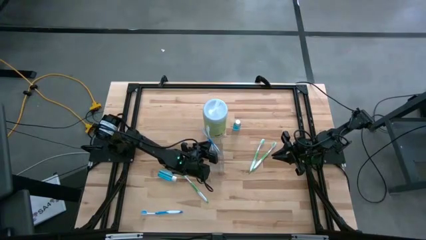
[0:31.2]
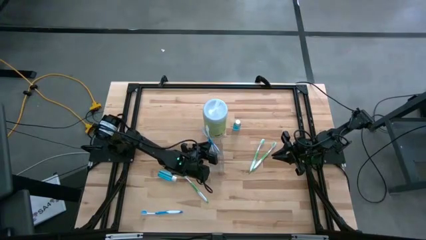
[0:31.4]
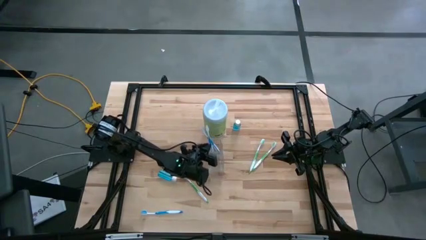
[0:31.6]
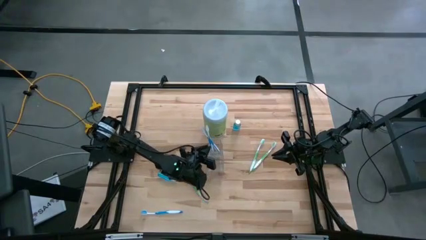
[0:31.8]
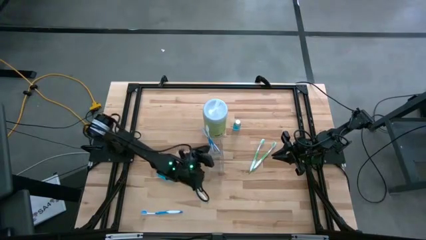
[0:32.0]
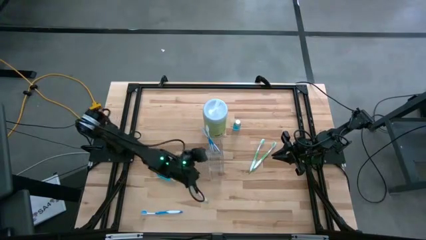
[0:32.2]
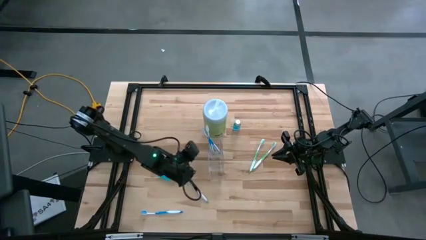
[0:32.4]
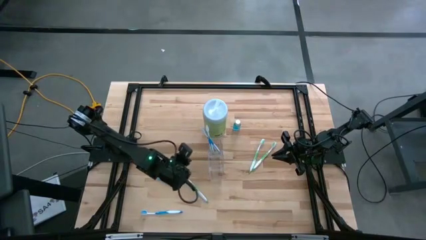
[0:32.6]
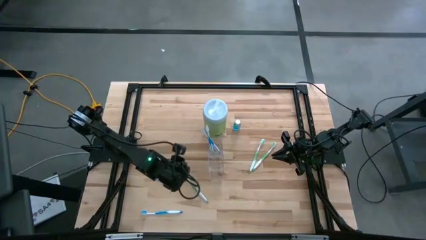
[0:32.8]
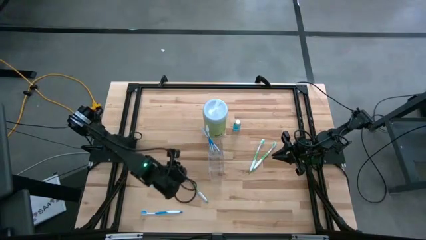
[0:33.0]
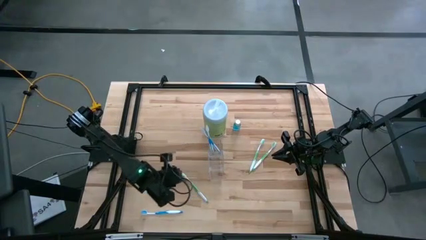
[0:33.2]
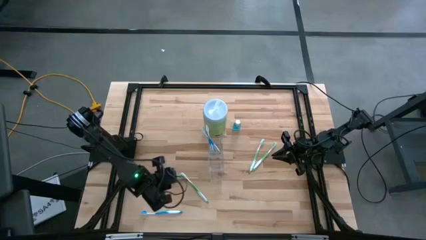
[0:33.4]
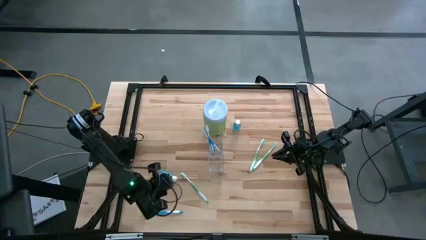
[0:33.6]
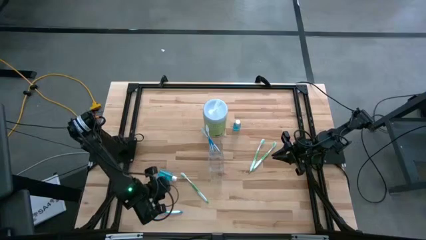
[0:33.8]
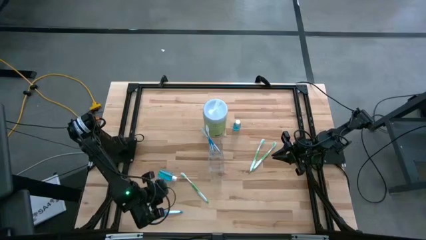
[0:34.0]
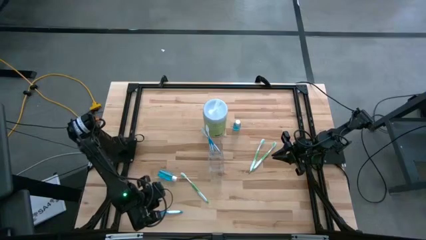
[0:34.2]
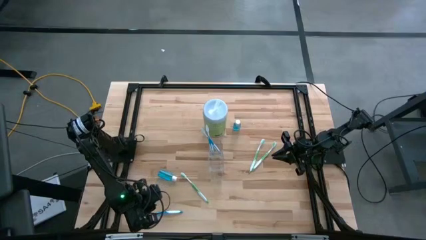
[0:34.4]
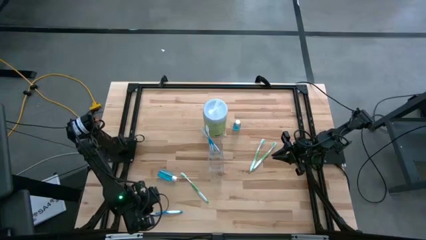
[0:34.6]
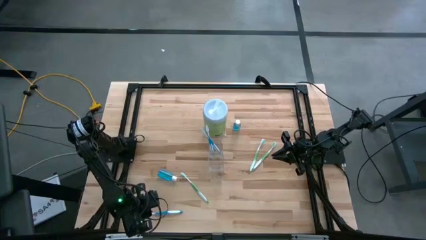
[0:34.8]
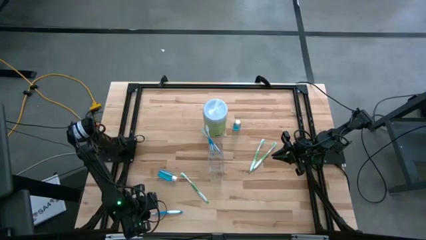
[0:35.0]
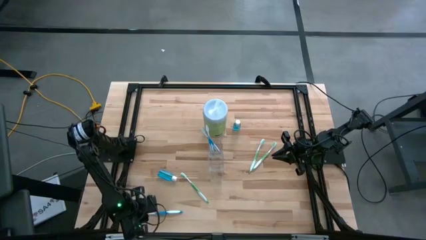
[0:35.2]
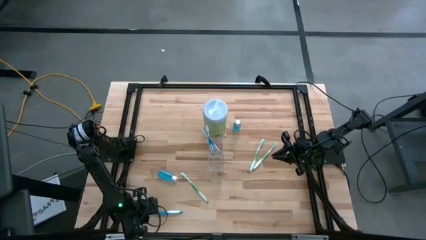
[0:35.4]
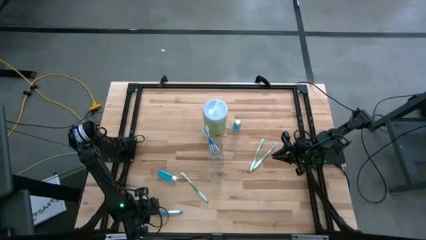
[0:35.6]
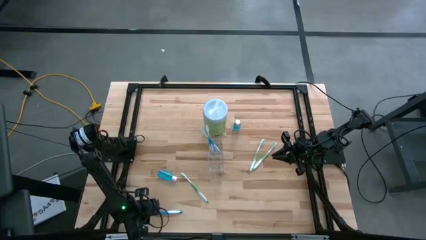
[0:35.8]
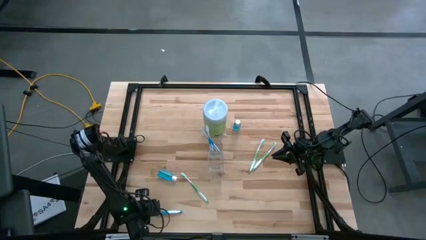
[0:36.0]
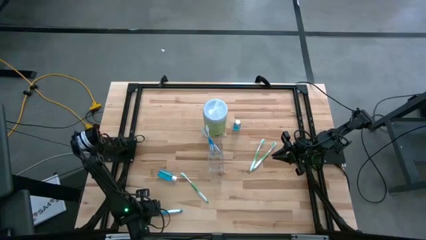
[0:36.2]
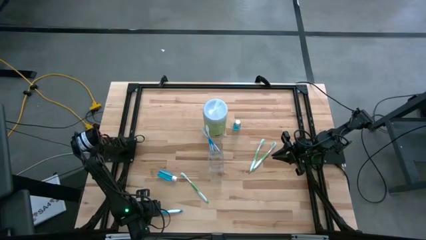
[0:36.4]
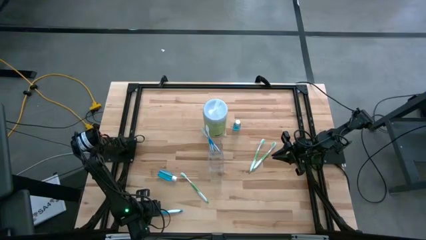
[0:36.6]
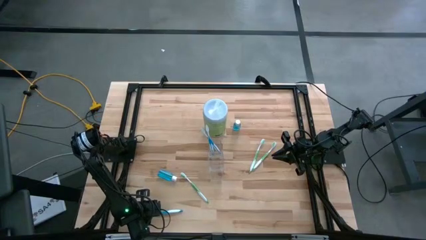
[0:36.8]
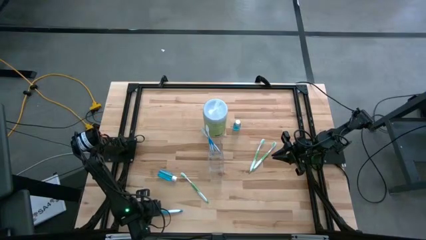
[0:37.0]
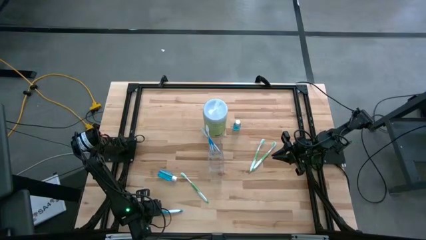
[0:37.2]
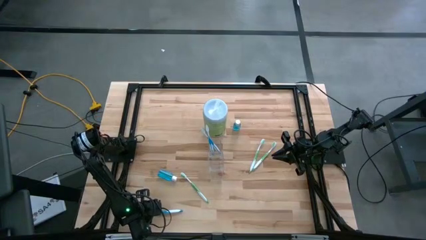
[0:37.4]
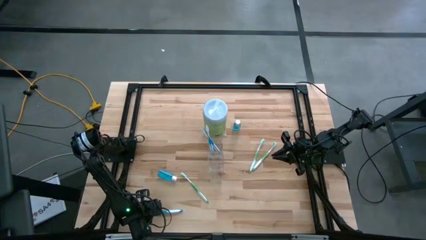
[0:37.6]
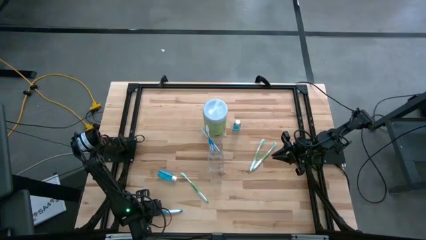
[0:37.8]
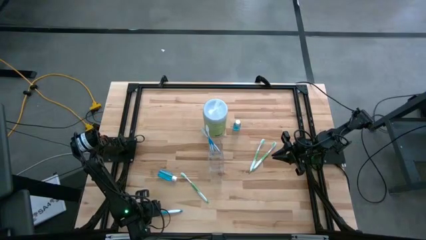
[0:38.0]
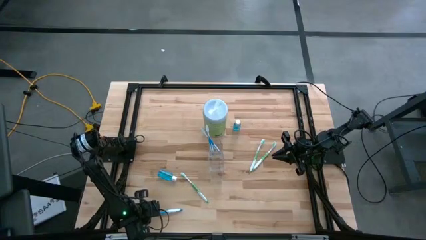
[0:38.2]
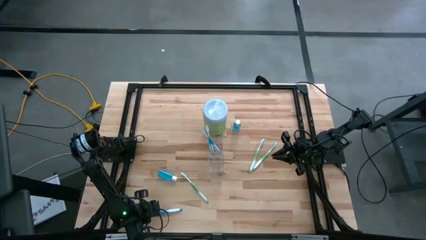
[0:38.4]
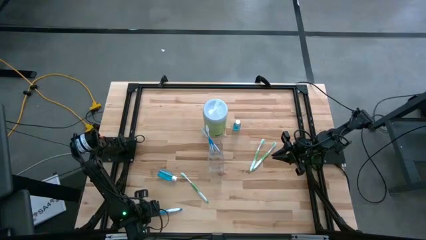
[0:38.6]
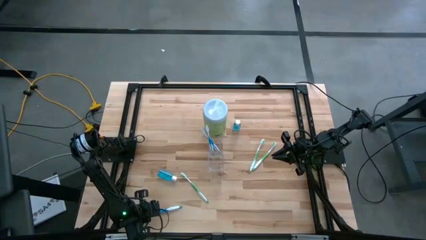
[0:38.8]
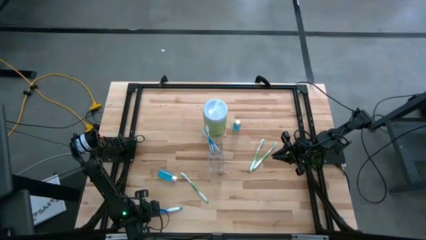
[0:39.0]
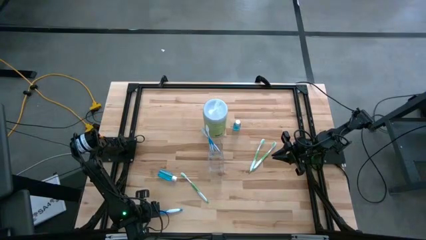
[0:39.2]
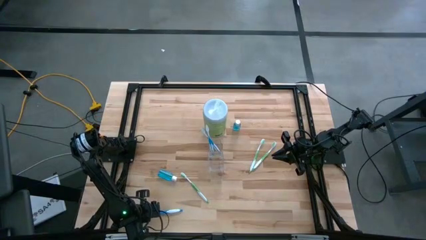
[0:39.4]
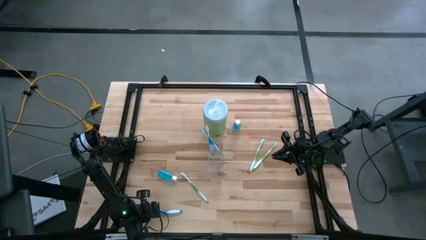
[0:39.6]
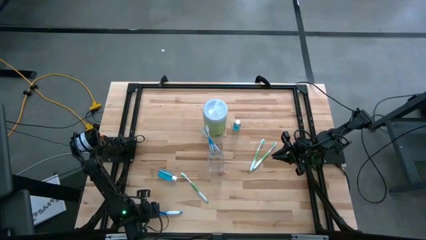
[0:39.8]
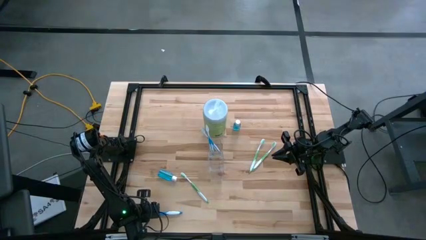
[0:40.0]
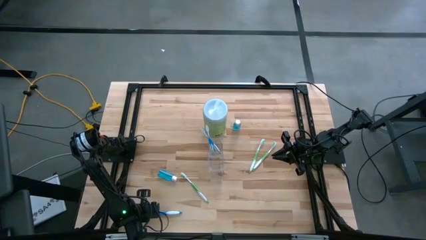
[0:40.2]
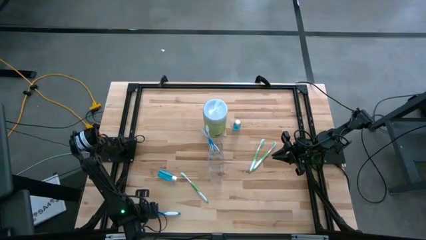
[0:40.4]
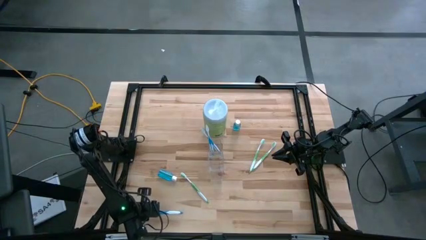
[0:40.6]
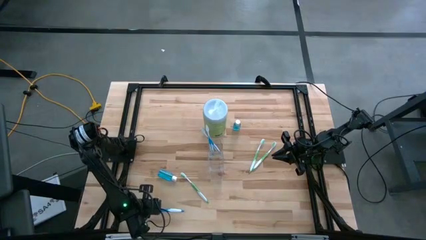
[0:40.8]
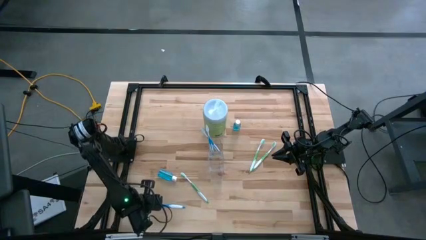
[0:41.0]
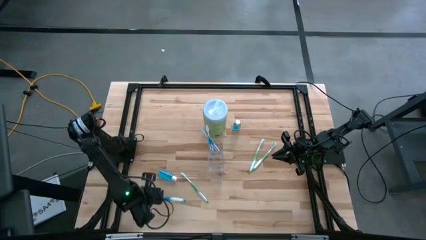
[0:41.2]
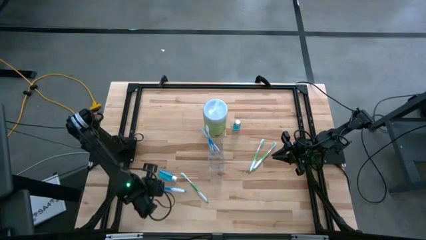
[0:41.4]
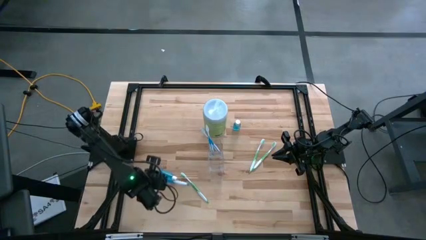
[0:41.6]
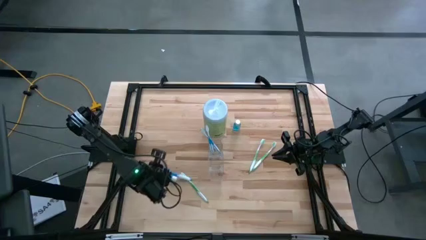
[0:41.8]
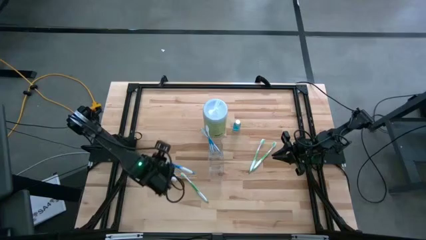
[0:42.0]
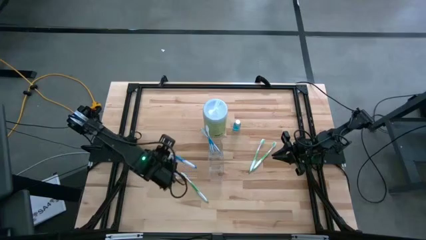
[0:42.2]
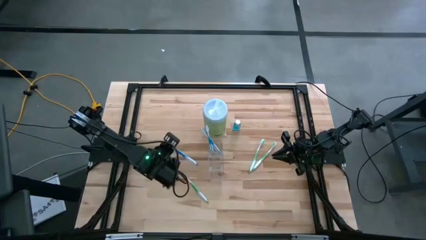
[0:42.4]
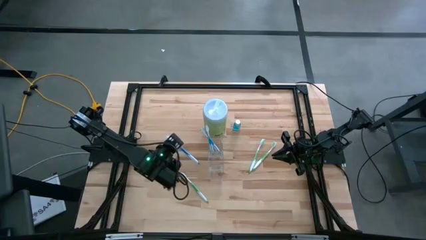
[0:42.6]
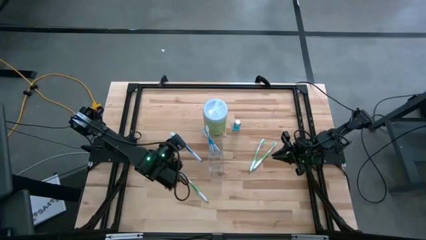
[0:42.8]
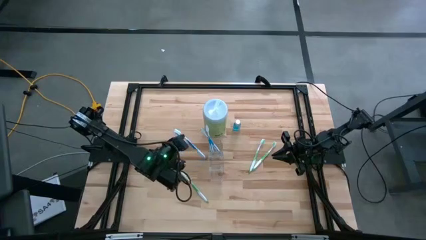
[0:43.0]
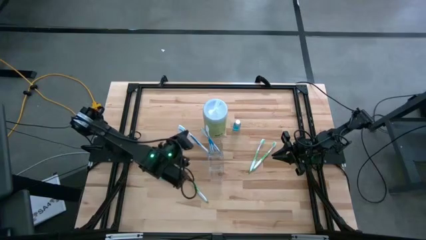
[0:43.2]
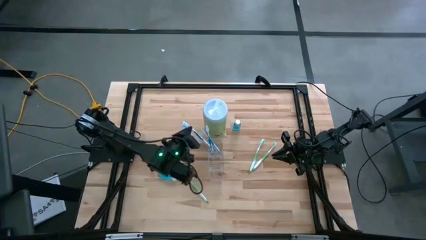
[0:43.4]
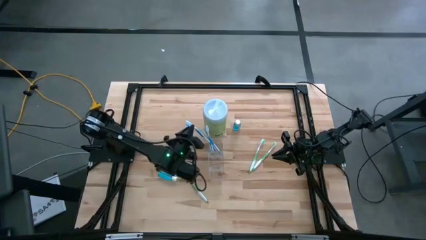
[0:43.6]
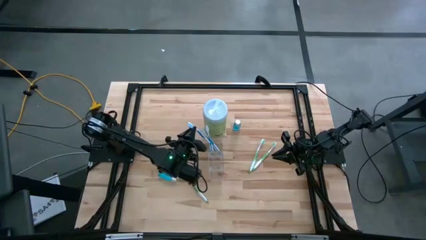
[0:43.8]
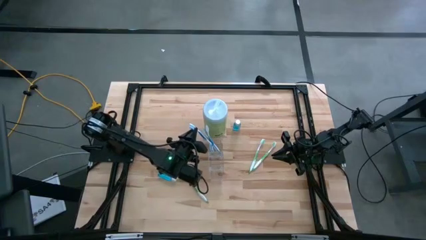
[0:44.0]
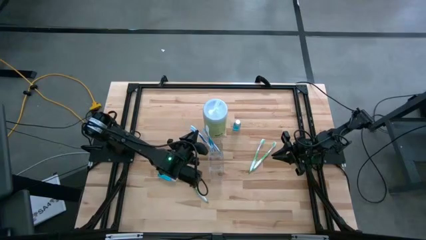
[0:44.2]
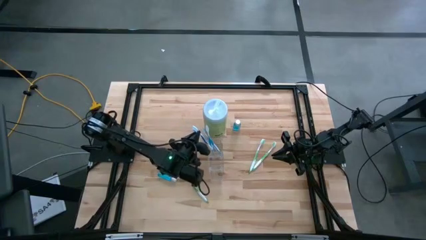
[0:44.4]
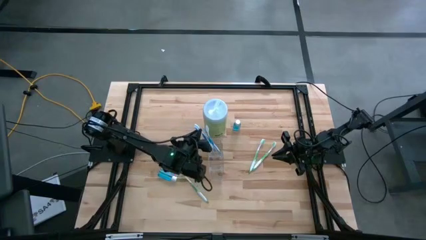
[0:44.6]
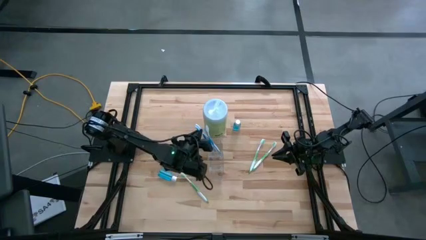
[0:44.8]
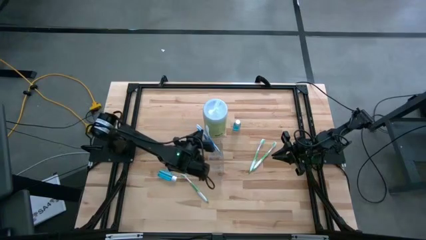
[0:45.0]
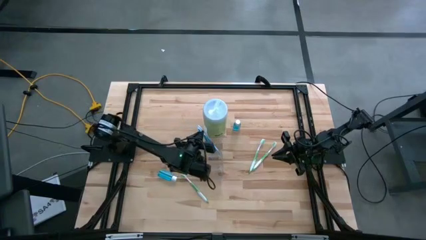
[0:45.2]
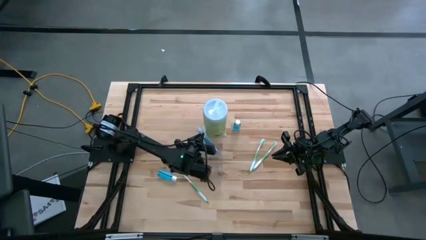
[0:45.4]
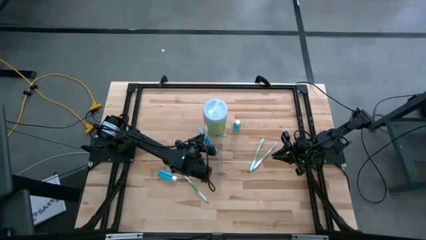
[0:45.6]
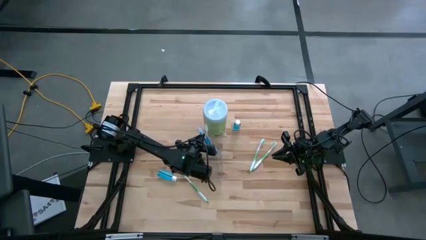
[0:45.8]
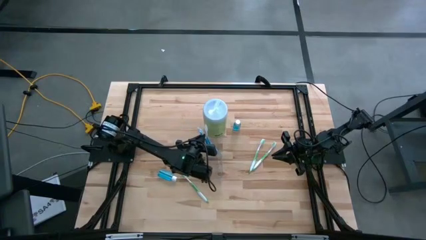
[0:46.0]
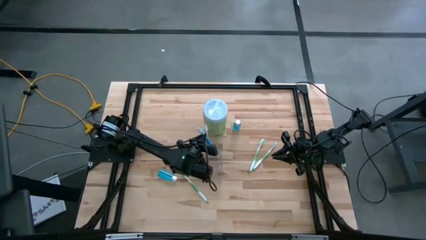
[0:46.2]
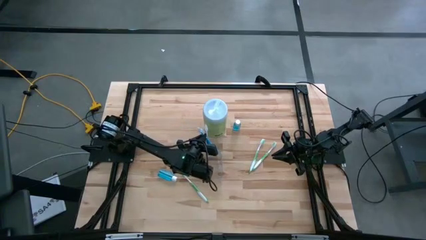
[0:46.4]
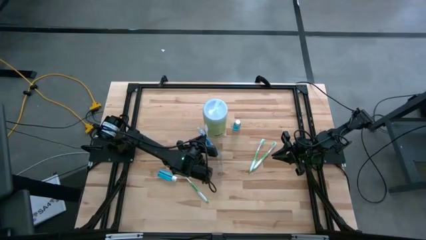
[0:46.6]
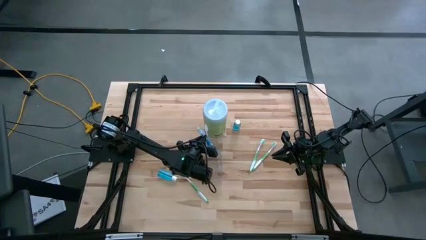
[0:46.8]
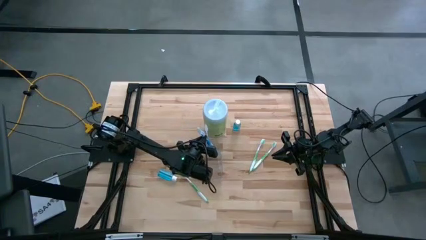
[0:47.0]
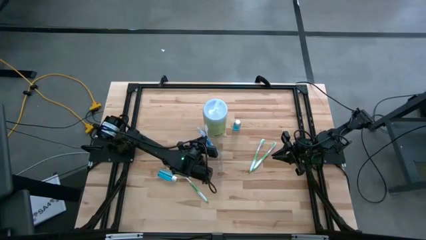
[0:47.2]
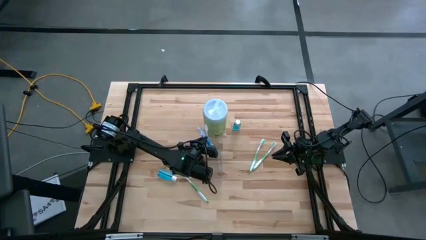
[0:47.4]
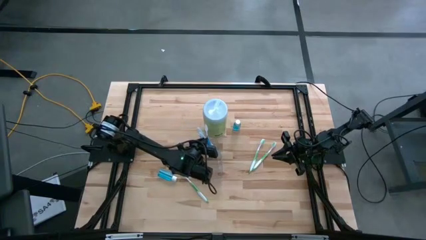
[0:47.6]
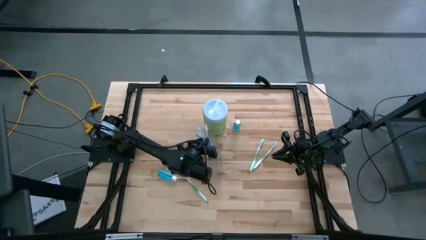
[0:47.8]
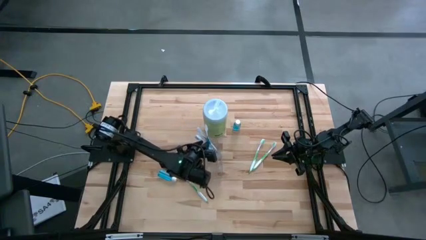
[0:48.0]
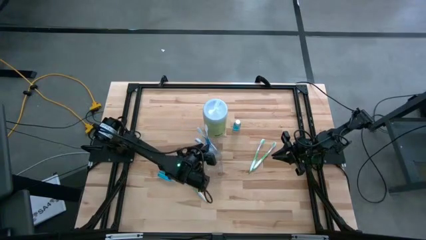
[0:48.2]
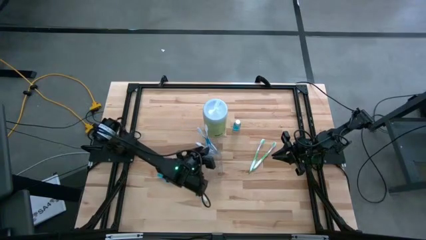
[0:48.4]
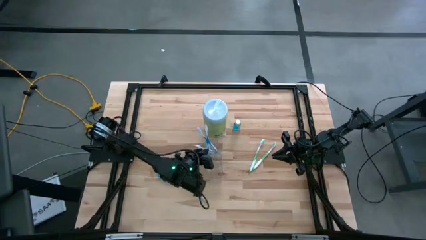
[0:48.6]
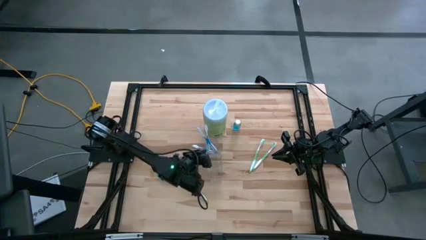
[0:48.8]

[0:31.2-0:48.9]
Task: Pick & Place toothbrushing station
Put the blue toothbrush into the transparent organizer
